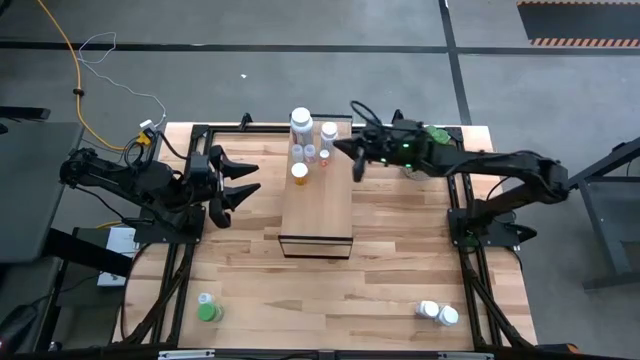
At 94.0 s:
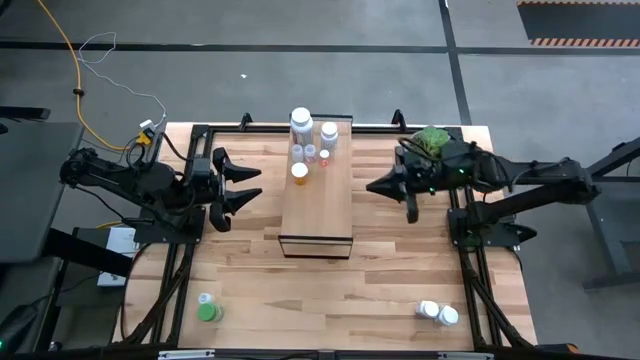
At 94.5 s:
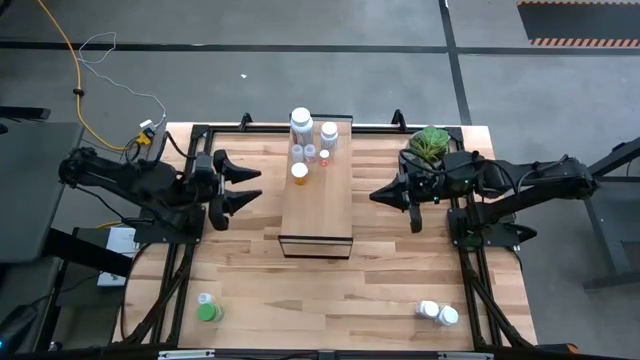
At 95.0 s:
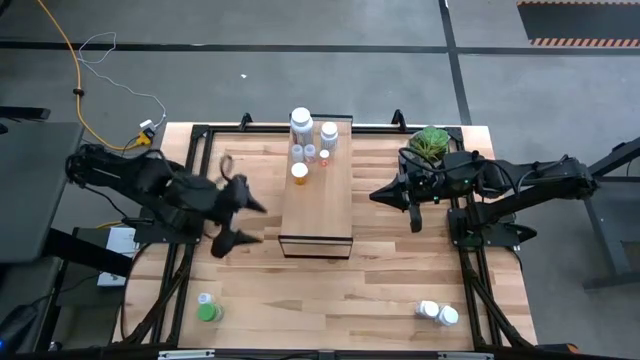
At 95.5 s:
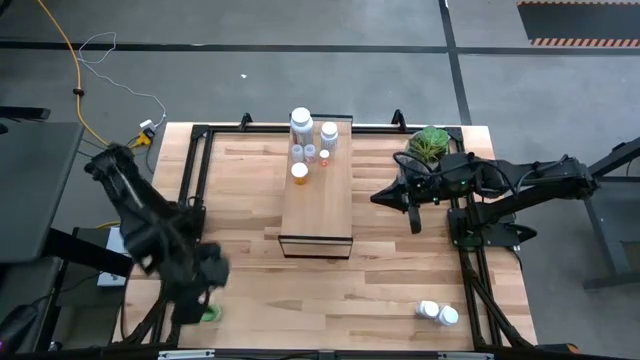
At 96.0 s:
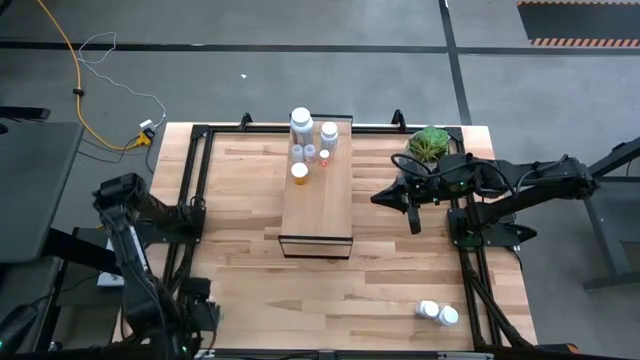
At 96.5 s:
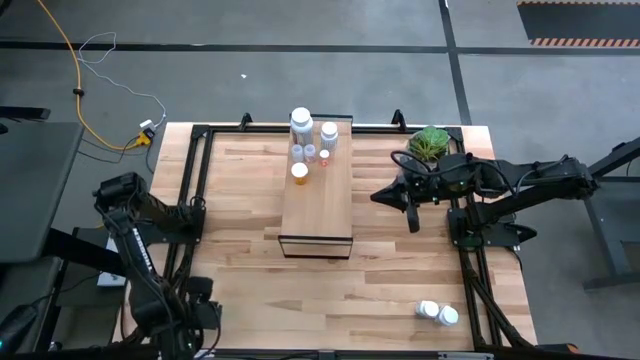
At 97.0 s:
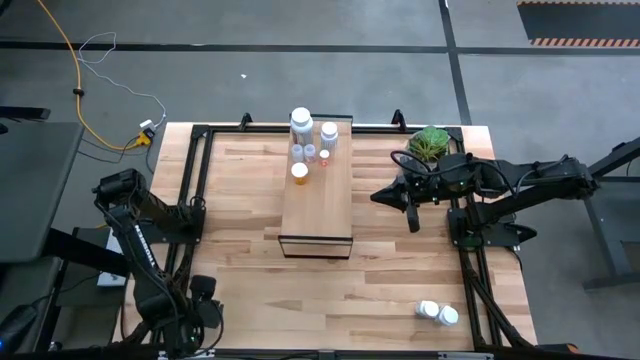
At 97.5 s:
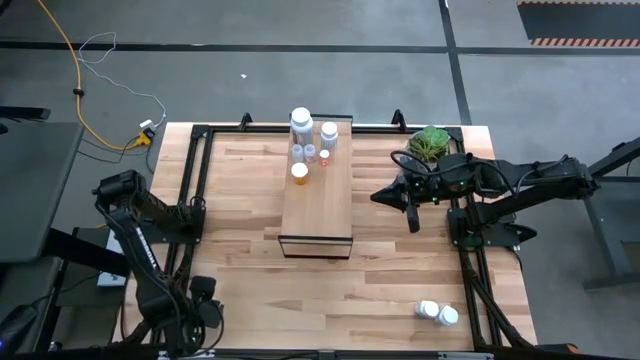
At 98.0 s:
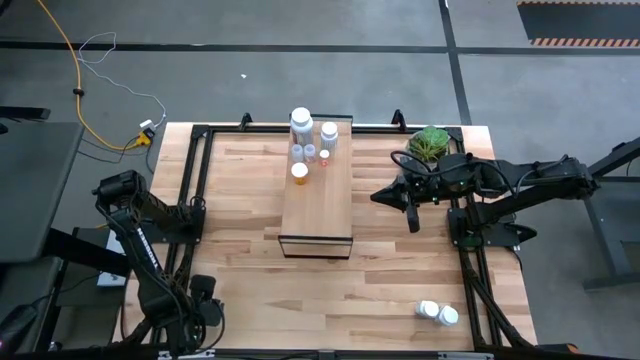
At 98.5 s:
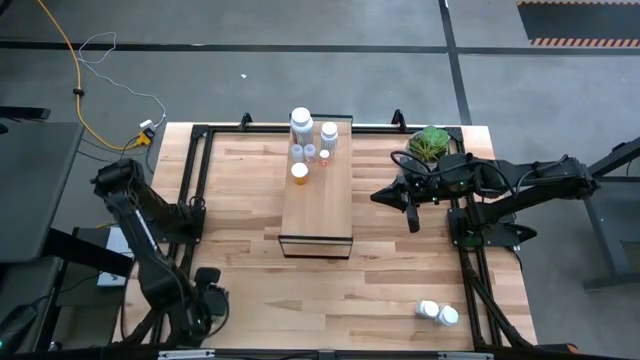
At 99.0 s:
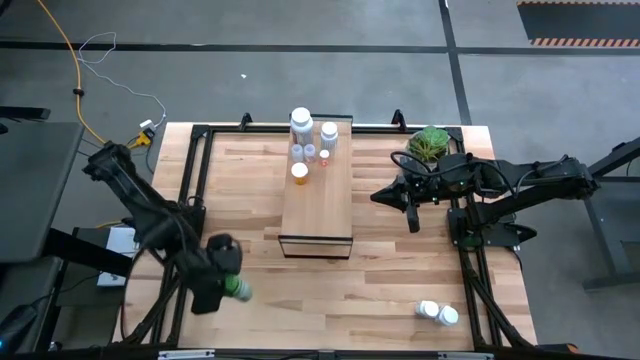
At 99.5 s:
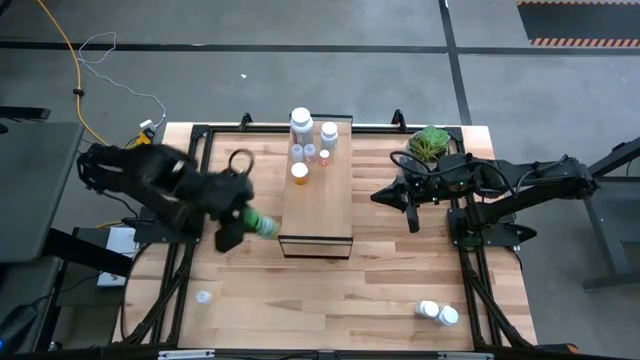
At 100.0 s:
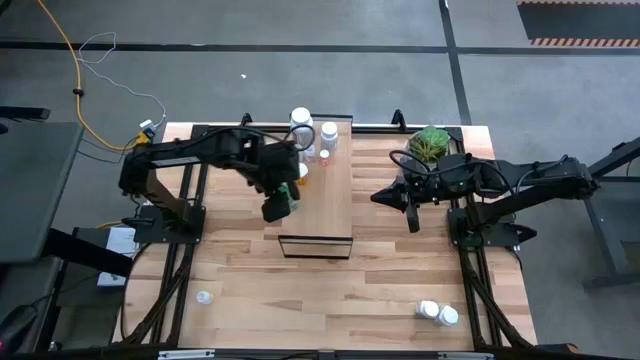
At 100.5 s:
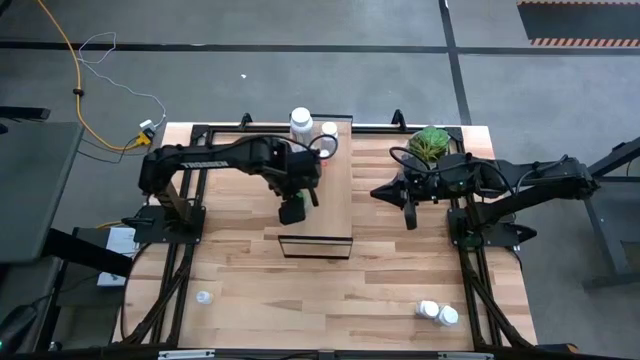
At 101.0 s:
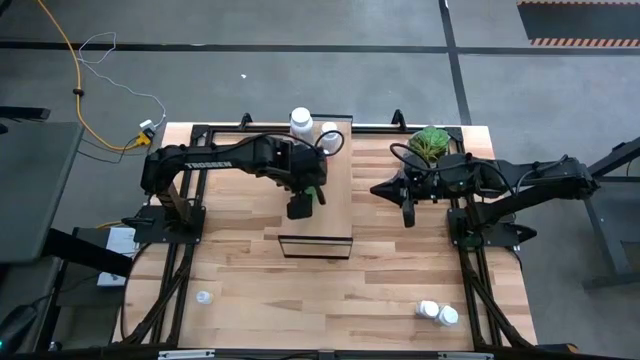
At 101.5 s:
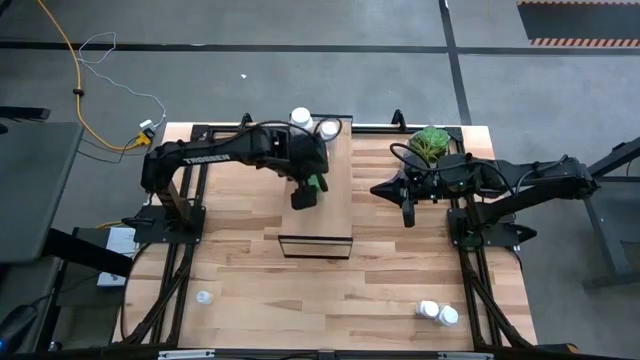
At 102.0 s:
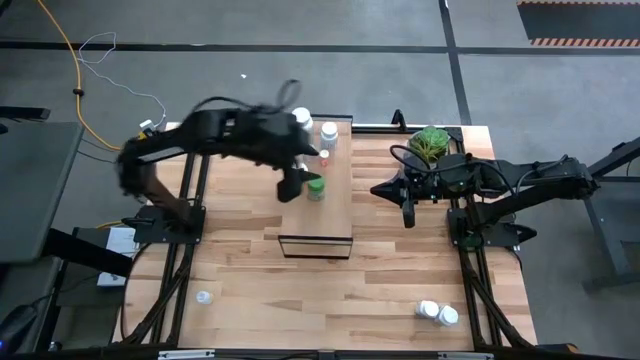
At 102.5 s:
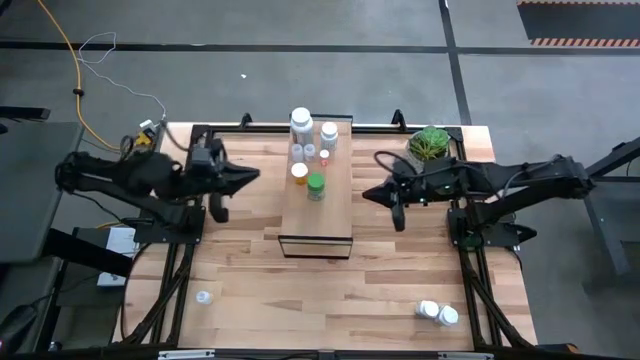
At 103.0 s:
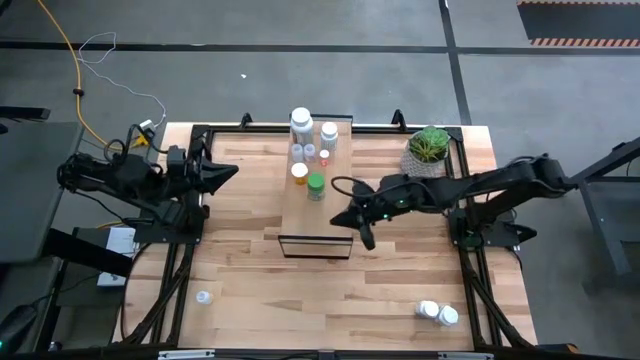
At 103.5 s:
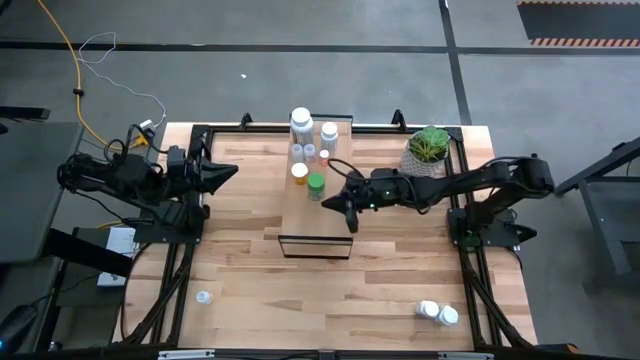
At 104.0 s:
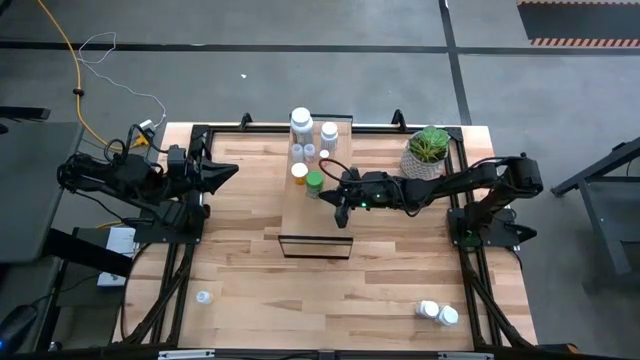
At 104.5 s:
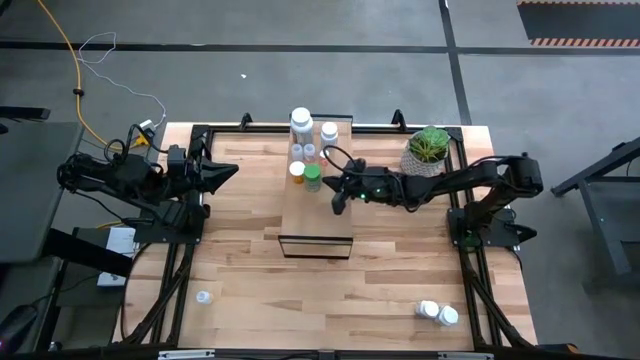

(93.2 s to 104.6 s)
Task: Pick and place medicine bottles onto shelf by color
Put the green medicine bottle on the shelf

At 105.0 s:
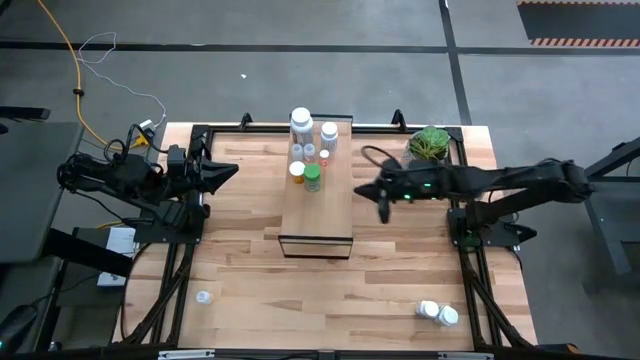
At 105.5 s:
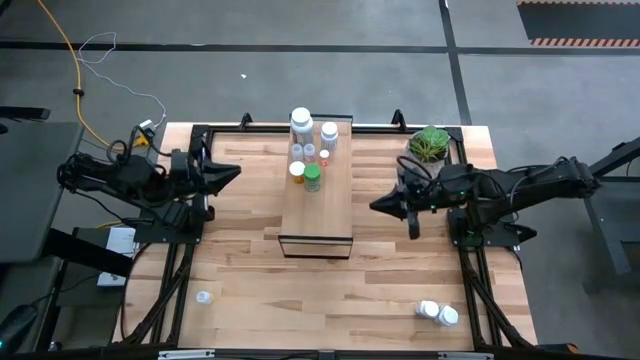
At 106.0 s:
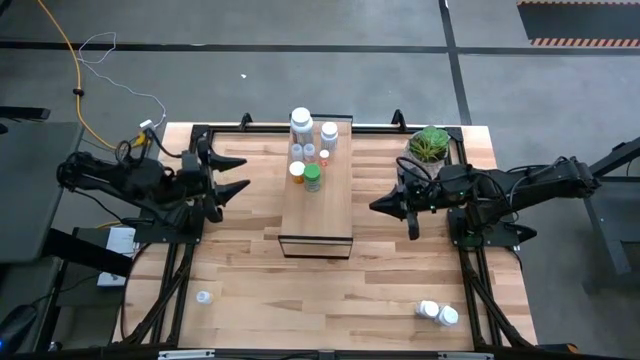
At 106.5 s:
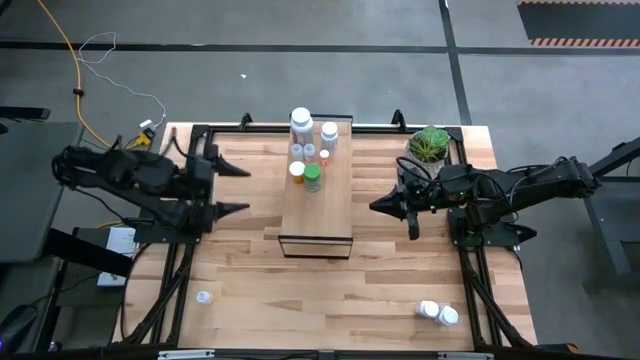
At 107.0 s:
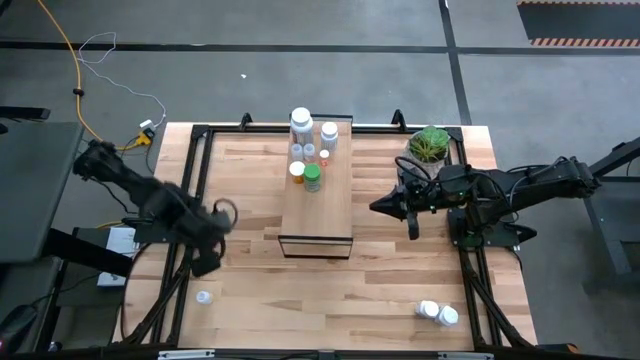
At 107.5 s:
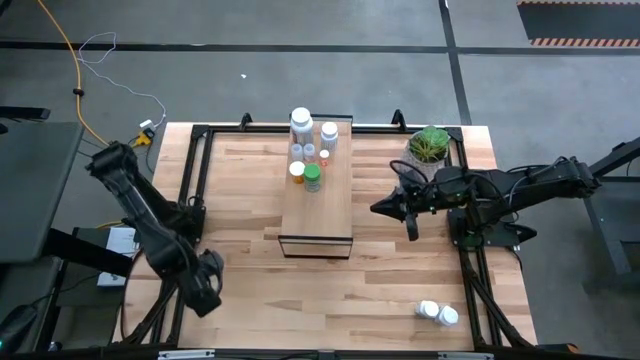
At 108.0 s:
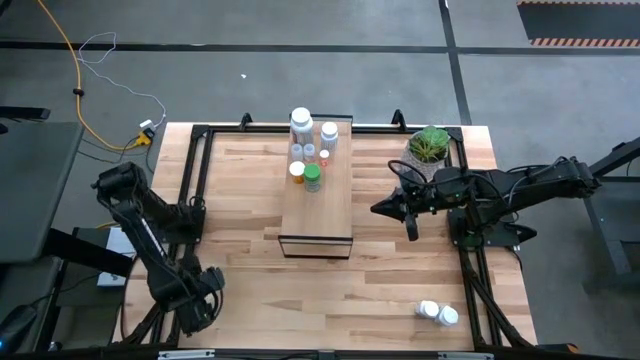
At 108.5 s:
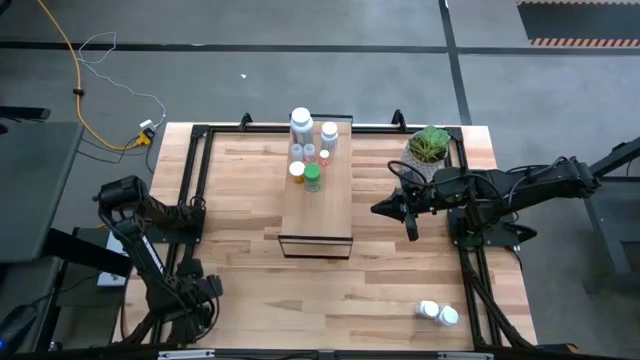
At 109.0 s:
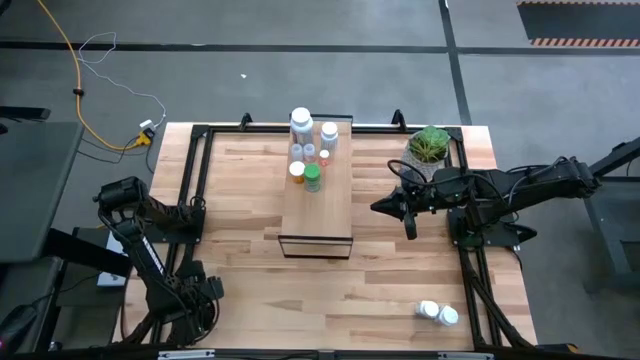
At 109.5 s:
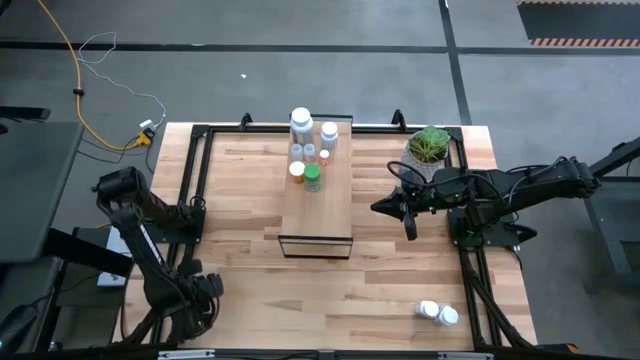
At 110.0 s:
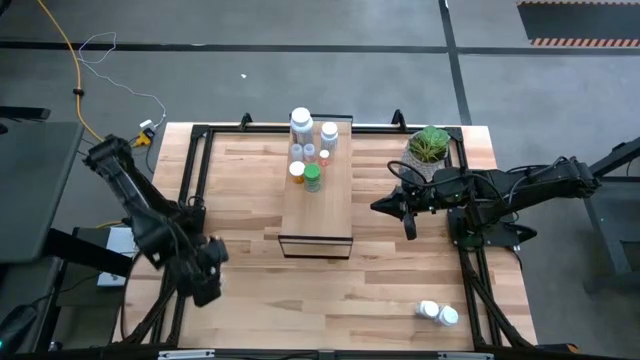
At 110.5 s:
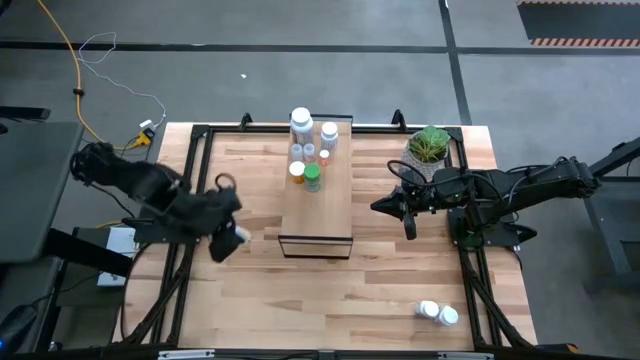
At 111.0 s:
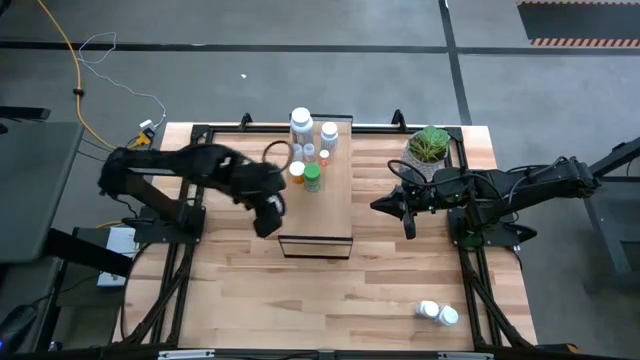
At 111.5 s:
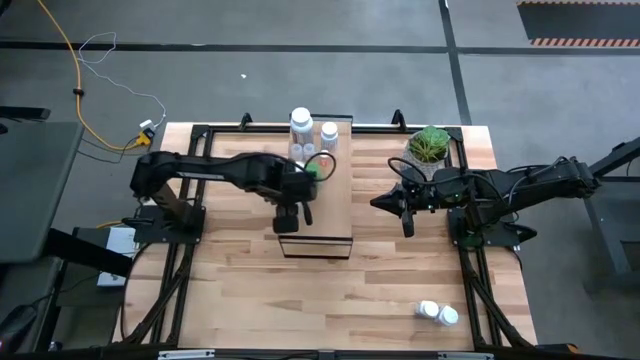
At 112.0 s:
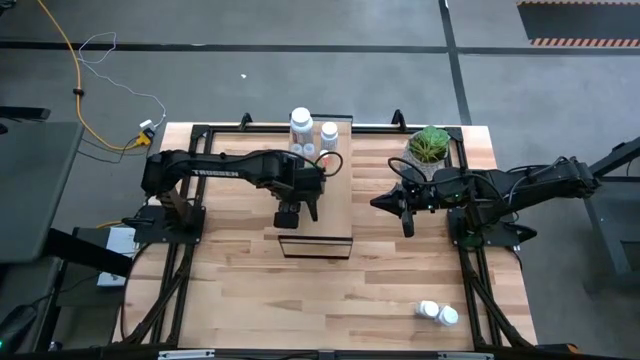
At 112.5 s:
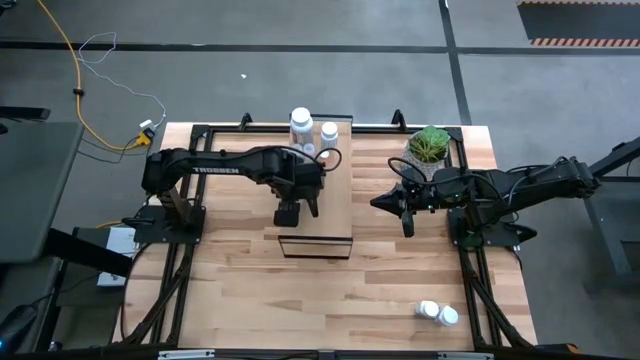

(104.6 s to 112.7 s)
Put the transparent medicine bottle on the shelf
